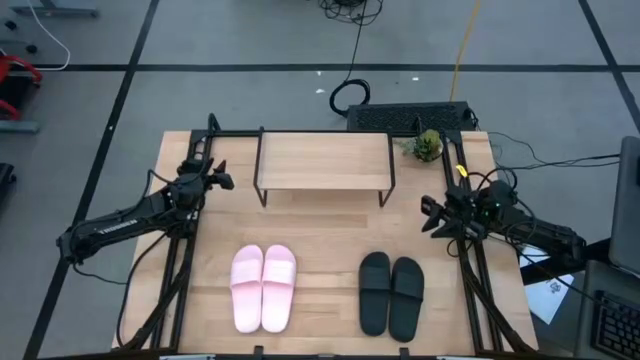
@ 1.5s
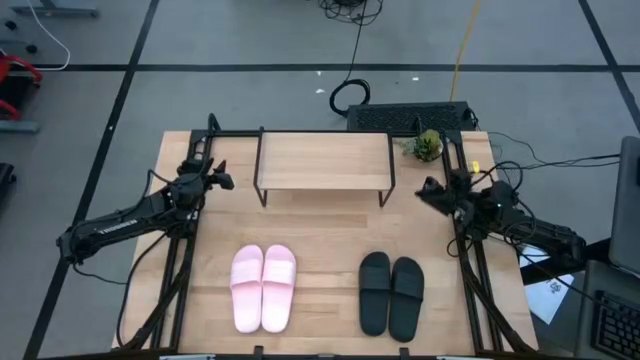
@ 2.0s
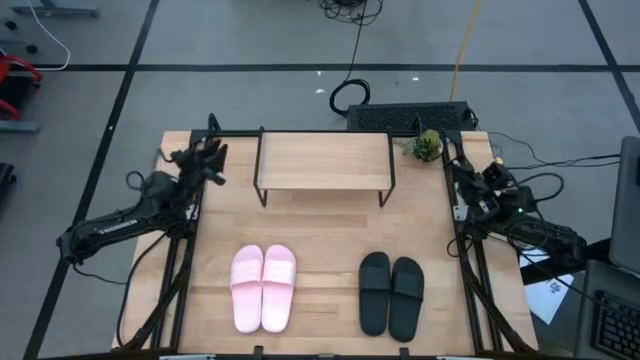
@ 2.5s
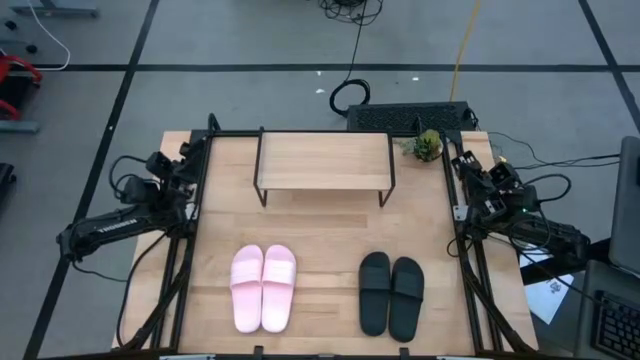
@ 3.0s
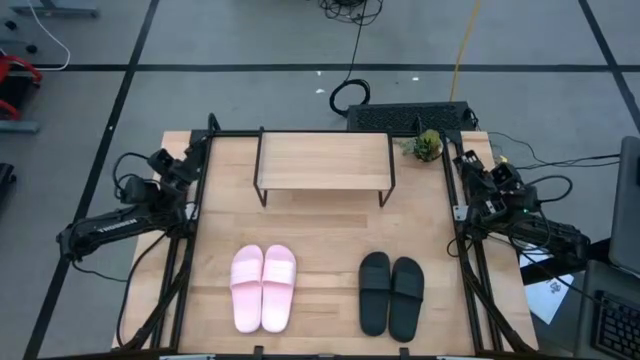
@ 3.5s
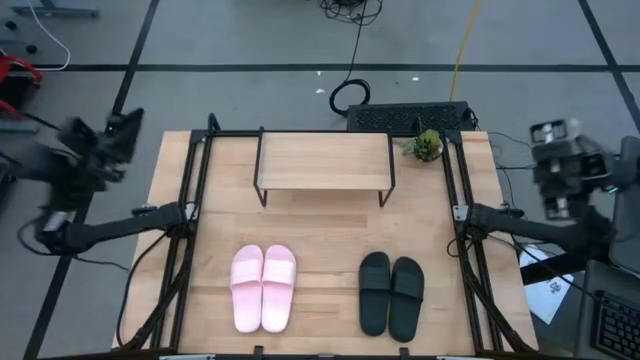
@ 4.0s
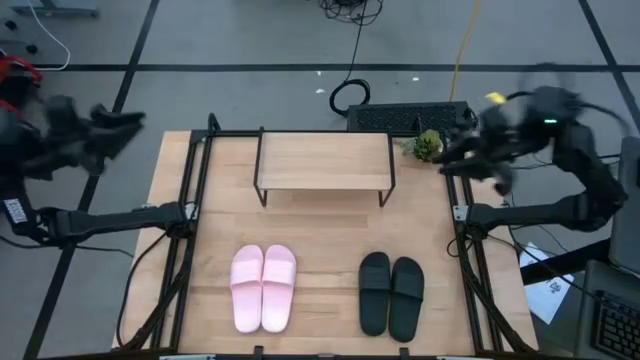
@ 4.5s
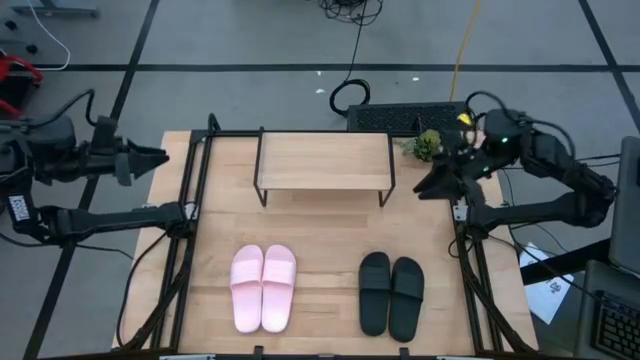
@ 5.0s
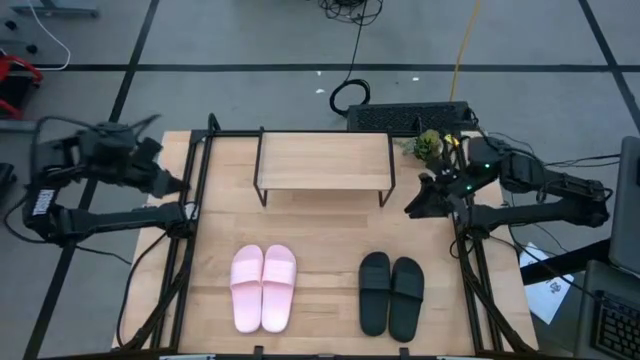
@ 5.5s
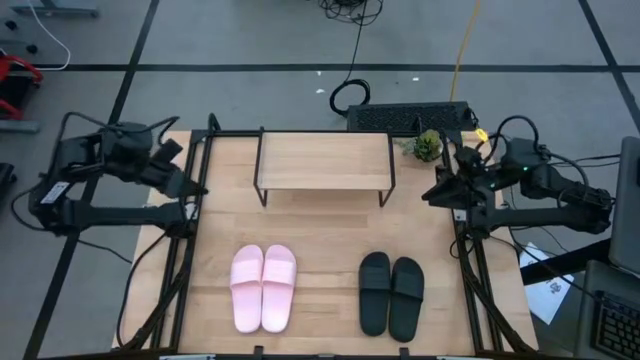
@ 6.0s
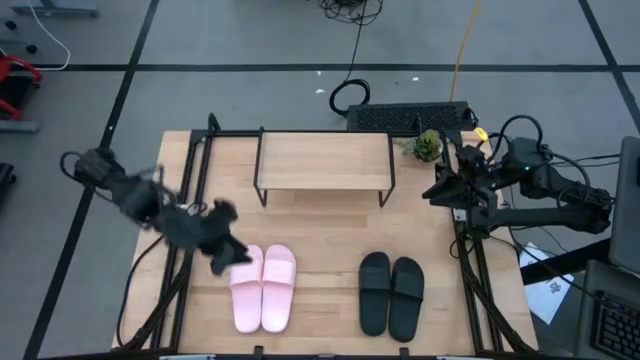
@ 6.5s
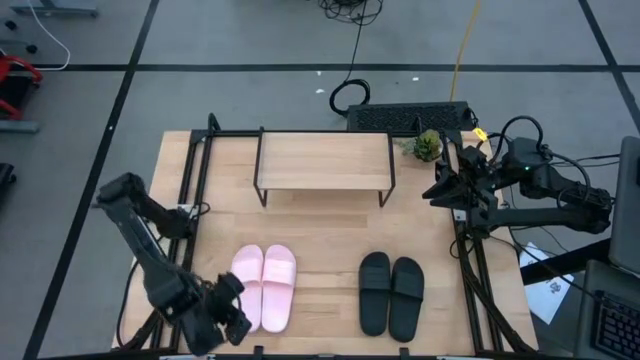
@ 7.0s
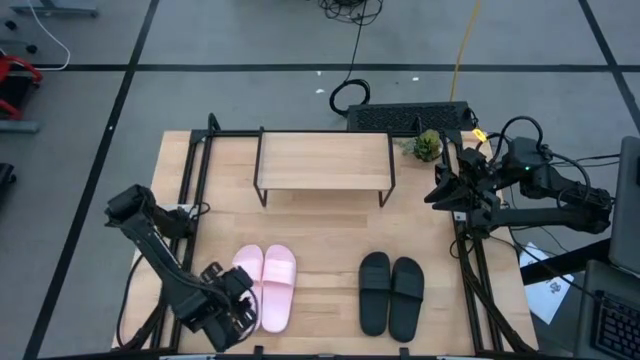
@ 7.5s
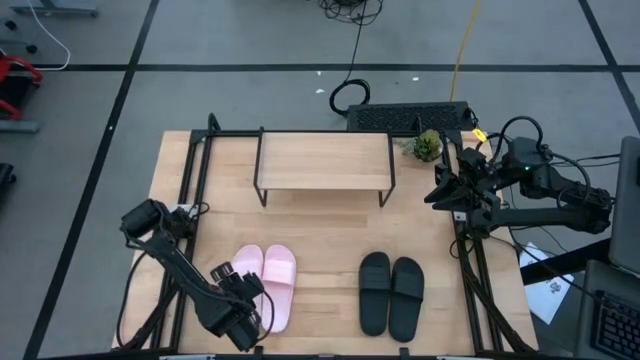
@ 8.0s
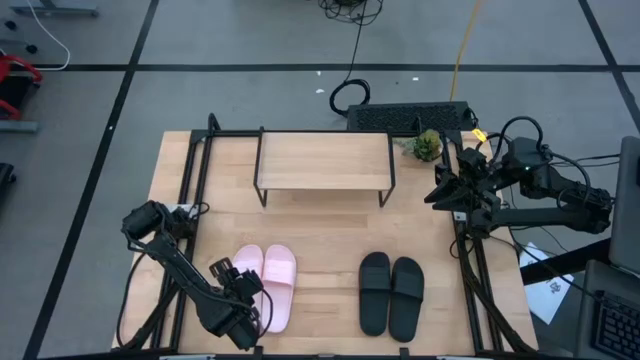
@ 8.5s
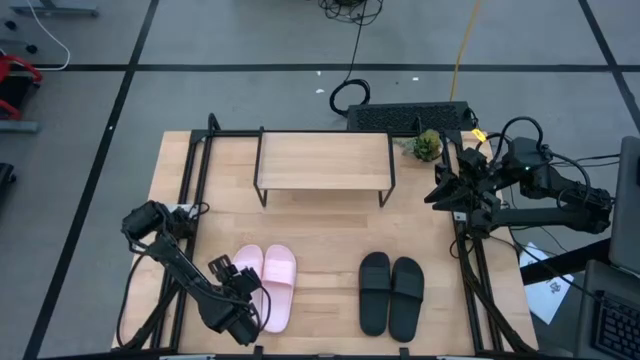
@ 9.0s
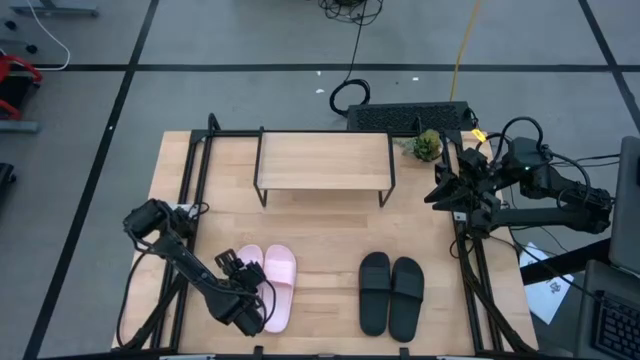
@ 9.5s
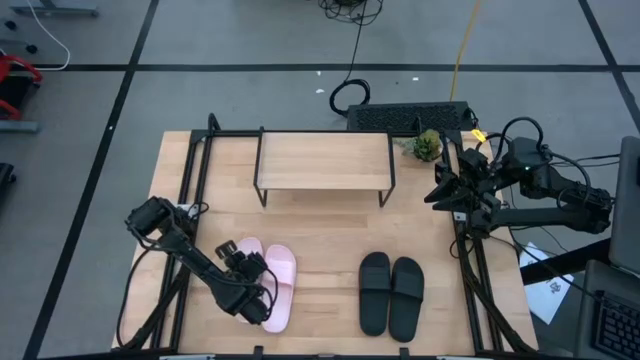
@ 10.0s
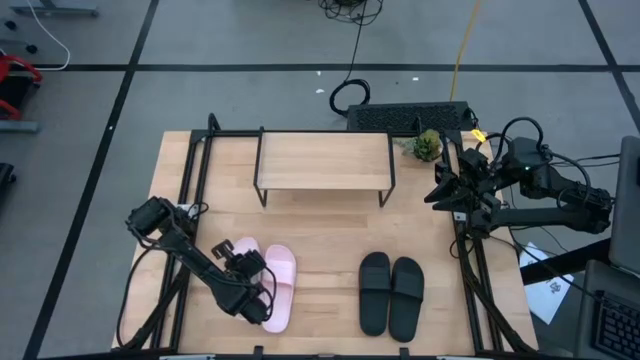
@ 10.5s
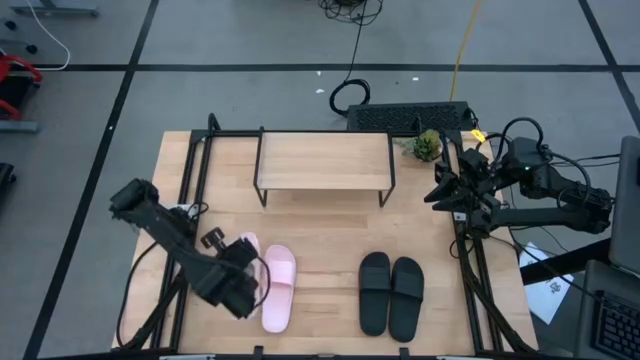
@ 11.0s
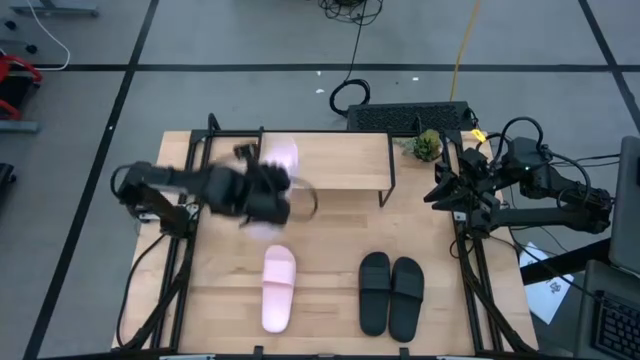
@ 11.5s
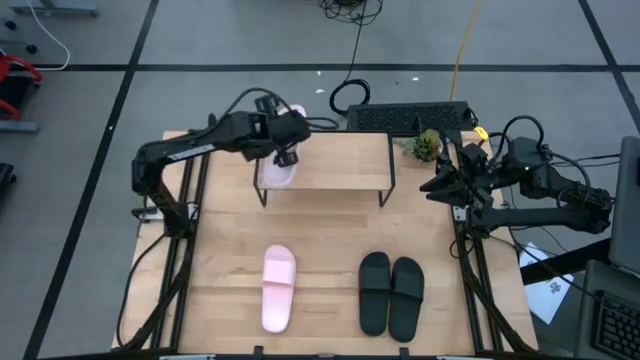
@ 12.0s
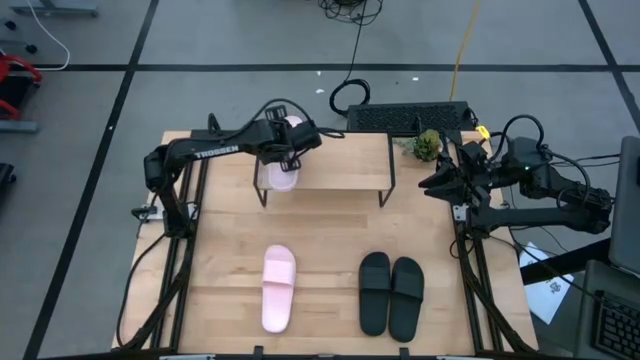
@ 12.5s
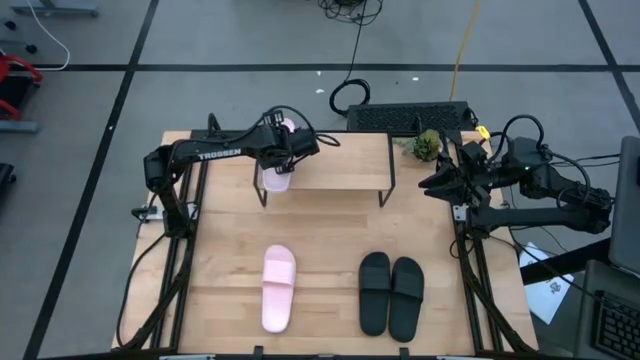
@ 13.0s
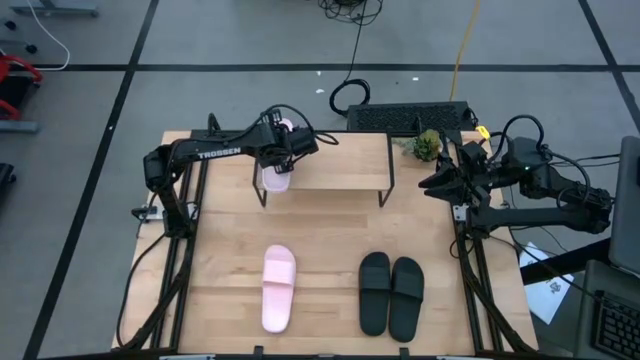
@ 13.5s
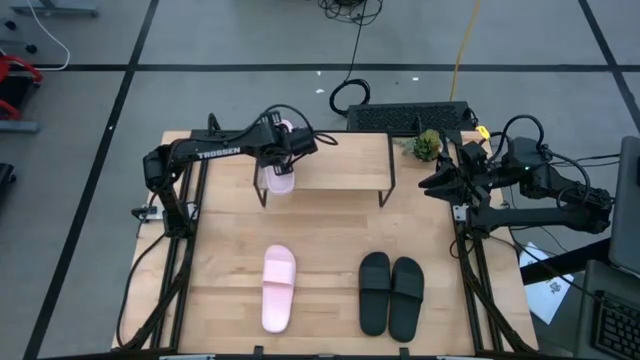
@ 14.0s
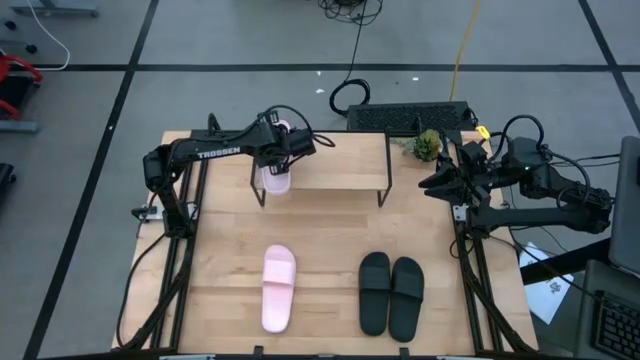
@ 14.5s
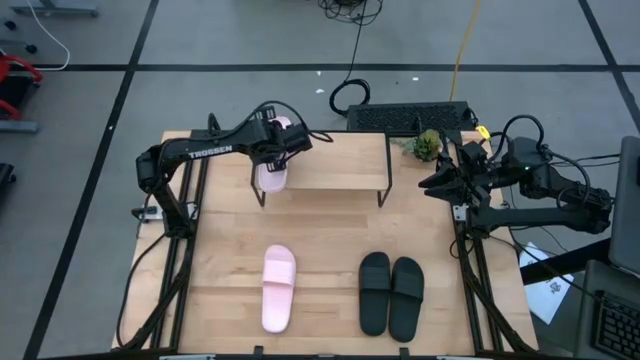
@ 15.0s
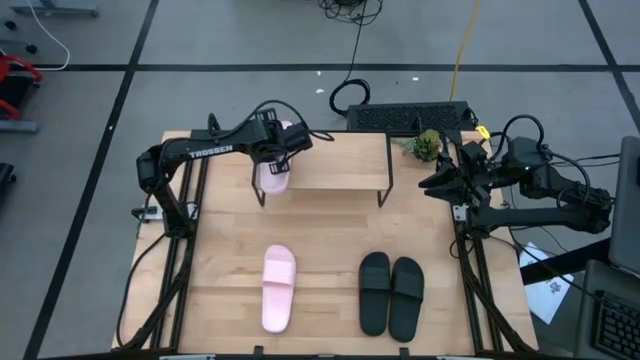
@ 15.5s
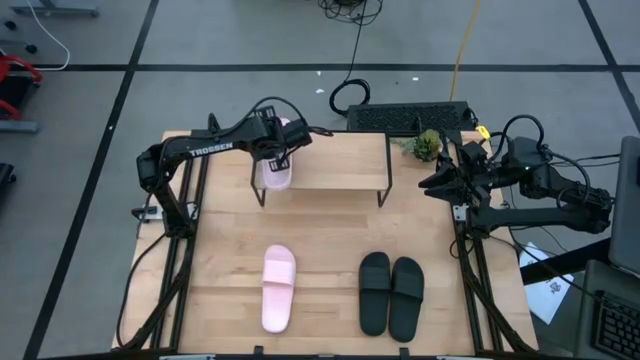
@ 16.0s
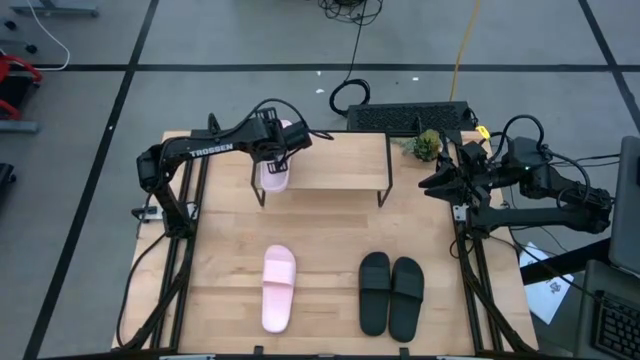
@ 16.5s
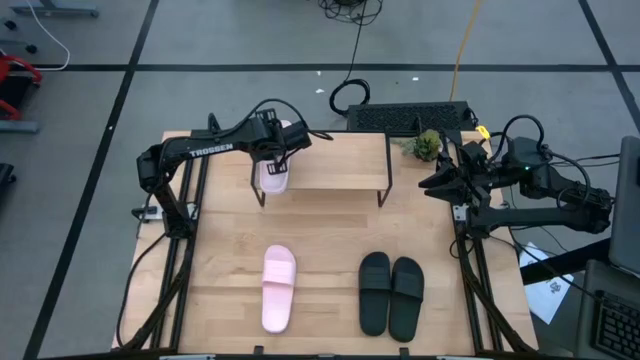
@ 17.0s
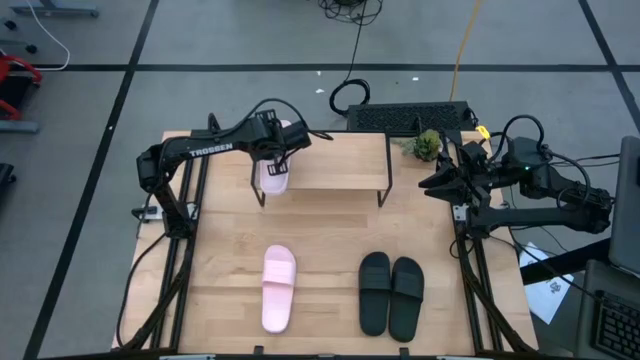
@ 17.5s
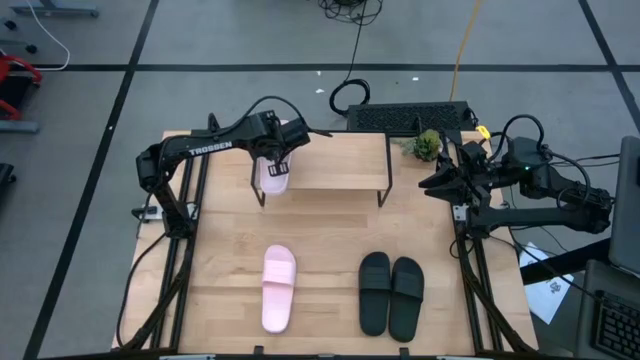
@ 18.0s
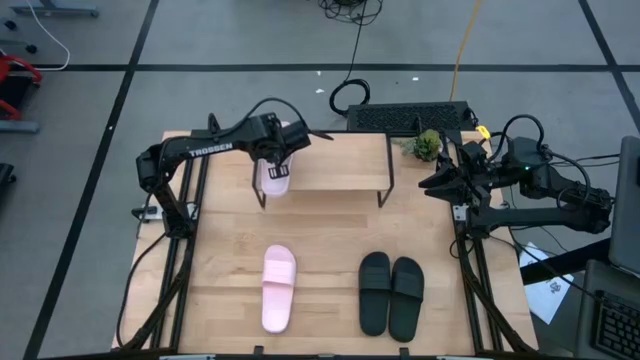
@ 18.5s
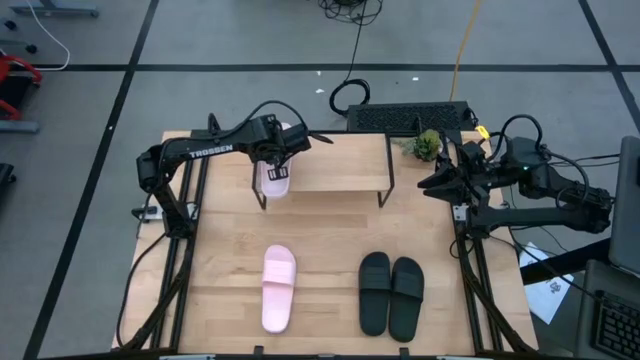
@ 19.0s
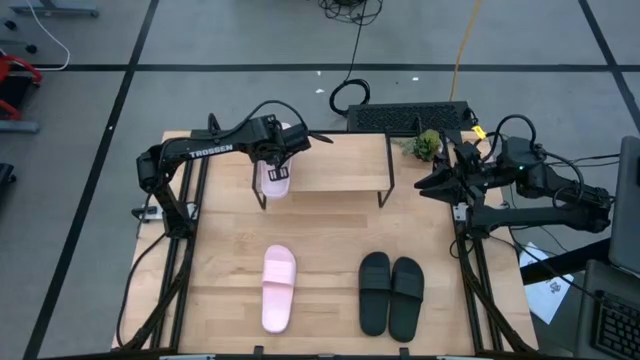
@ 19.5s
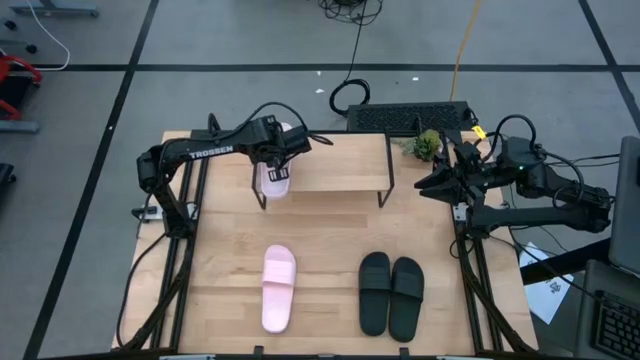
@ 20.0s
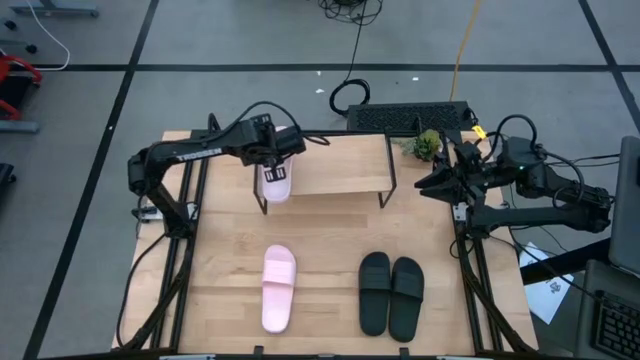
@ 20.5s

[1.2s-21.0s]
Task: Pick and place slides into the shelf
Put the left pink slide on the shelf
